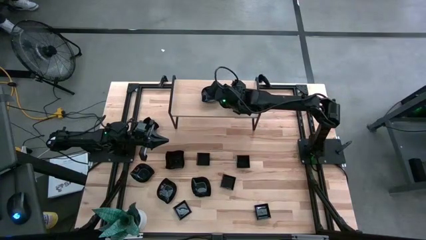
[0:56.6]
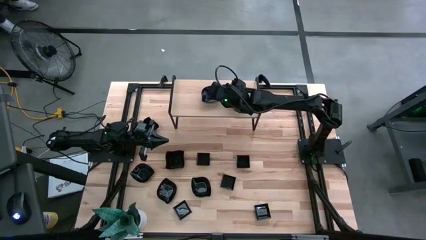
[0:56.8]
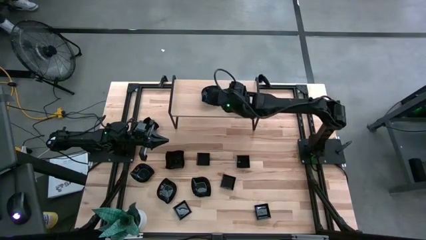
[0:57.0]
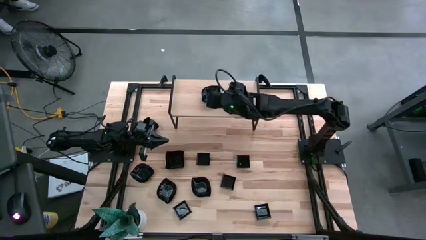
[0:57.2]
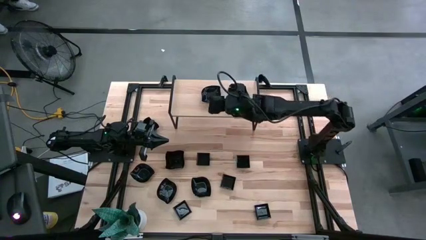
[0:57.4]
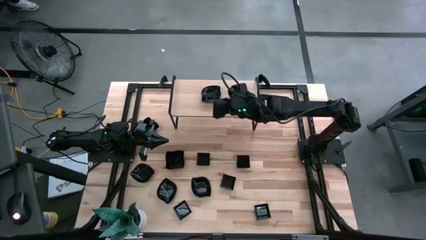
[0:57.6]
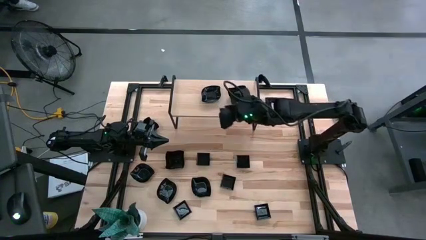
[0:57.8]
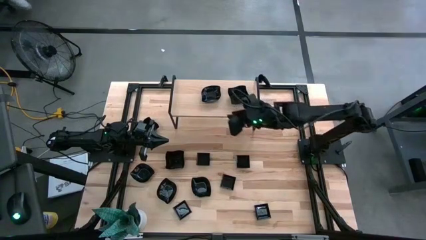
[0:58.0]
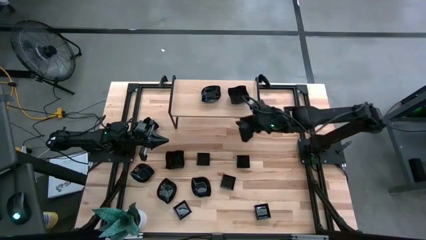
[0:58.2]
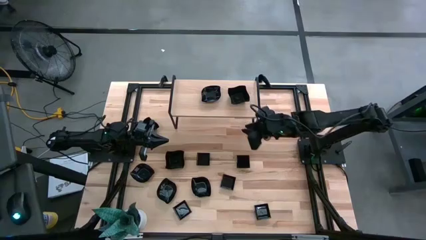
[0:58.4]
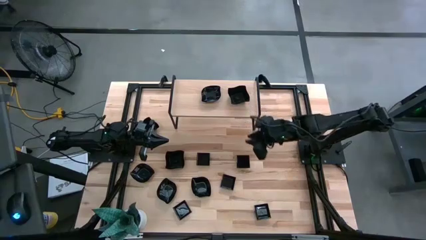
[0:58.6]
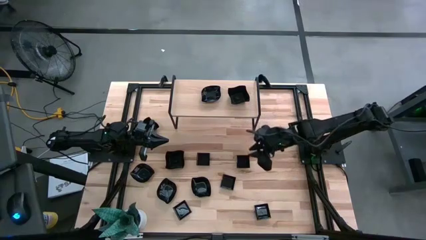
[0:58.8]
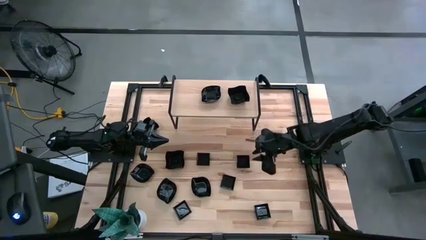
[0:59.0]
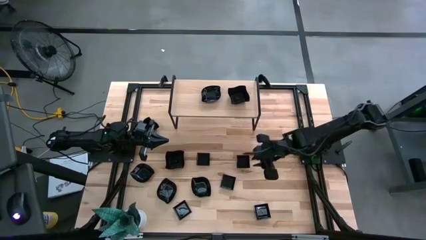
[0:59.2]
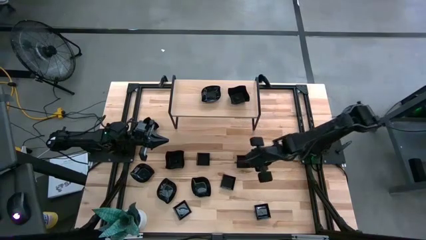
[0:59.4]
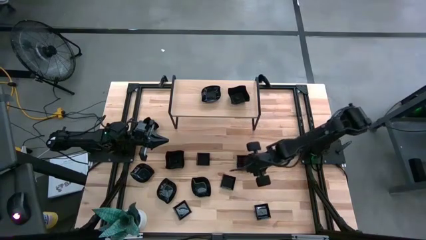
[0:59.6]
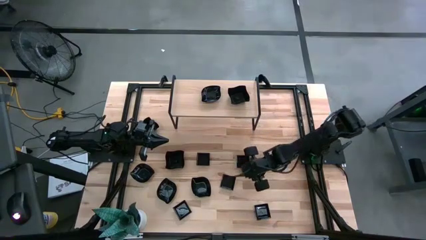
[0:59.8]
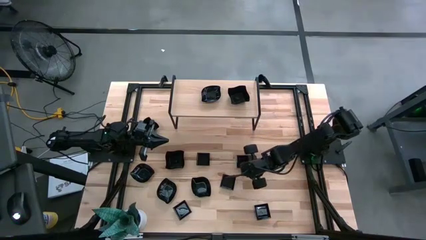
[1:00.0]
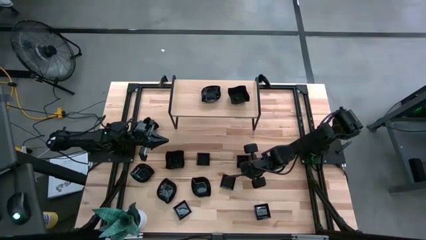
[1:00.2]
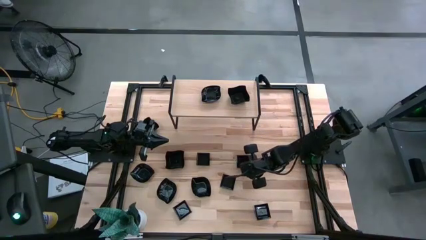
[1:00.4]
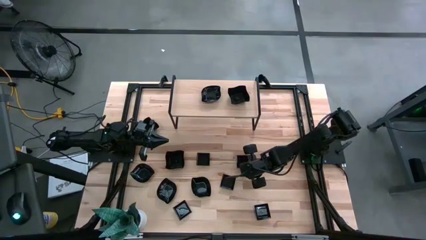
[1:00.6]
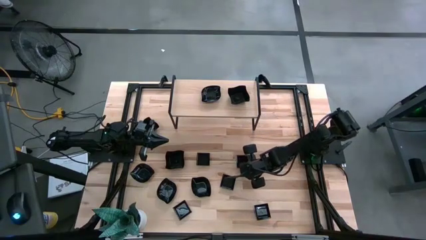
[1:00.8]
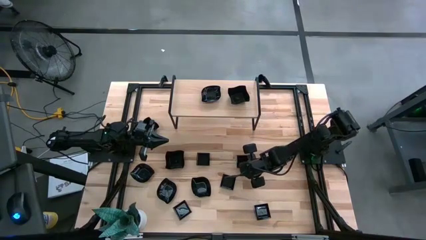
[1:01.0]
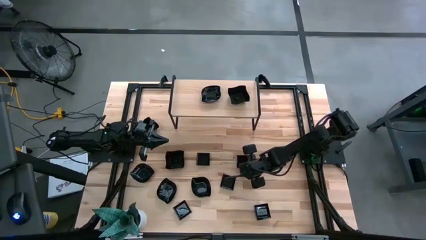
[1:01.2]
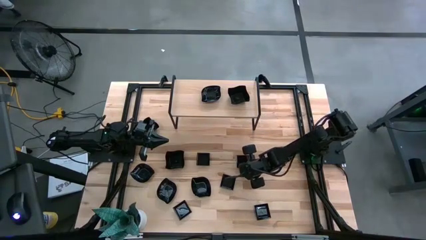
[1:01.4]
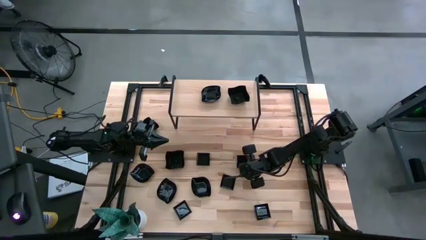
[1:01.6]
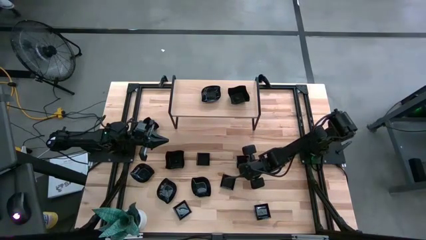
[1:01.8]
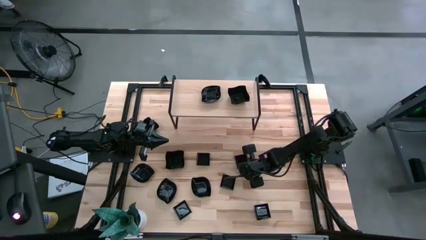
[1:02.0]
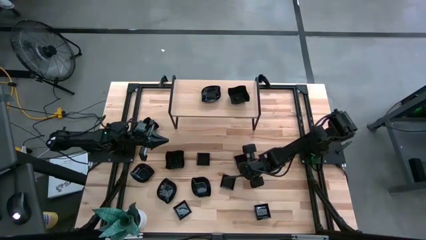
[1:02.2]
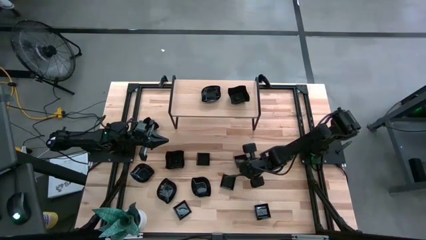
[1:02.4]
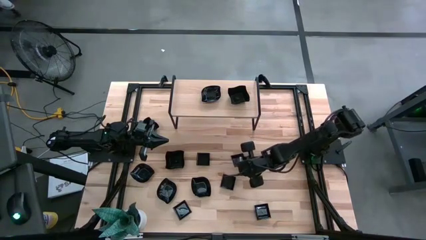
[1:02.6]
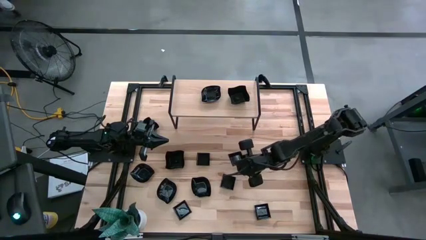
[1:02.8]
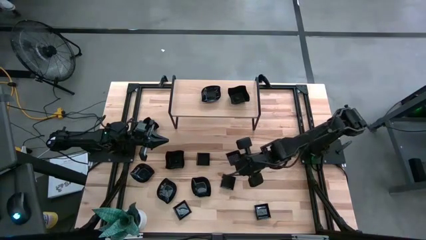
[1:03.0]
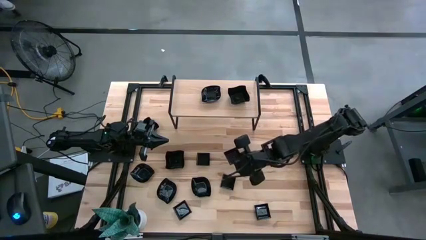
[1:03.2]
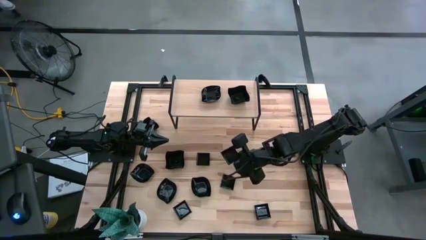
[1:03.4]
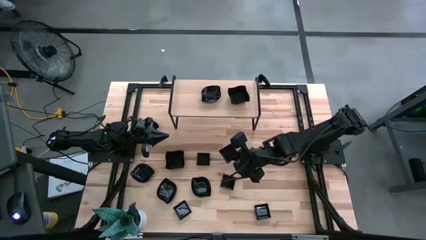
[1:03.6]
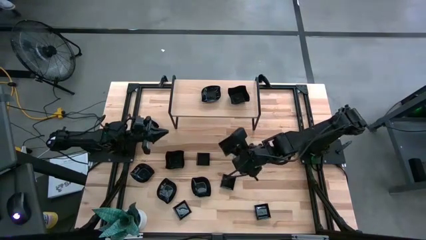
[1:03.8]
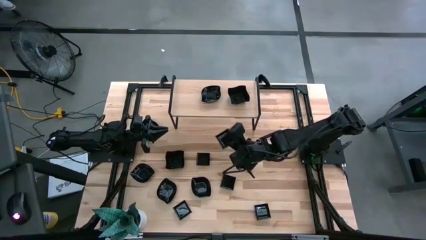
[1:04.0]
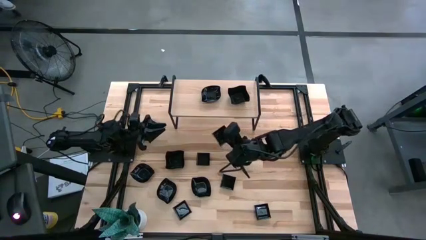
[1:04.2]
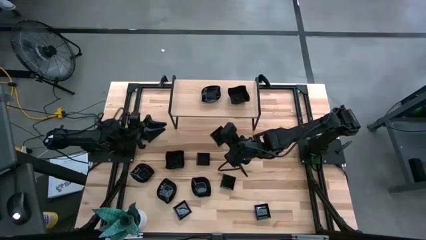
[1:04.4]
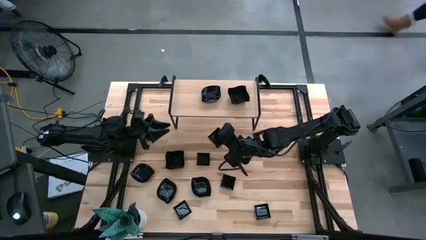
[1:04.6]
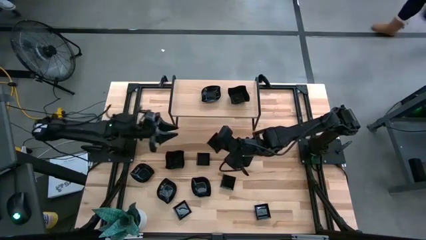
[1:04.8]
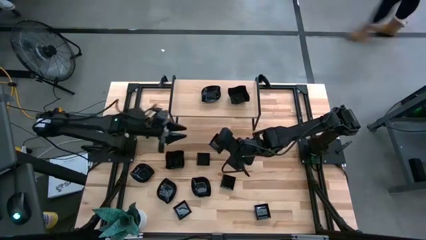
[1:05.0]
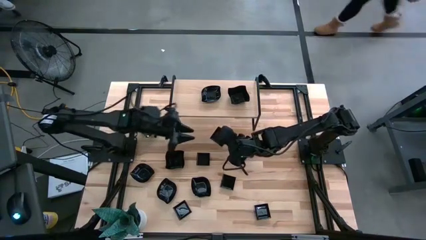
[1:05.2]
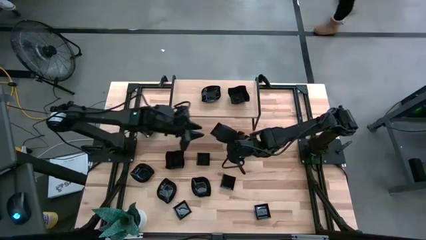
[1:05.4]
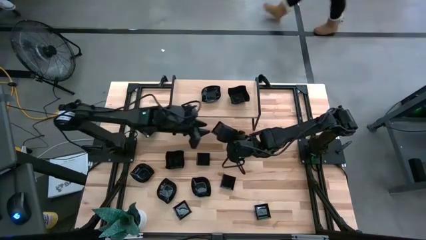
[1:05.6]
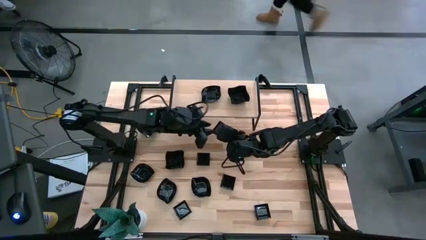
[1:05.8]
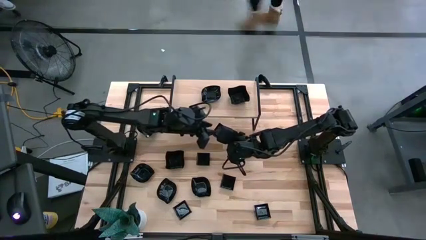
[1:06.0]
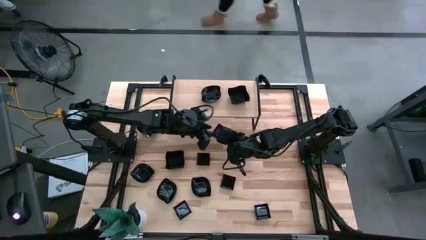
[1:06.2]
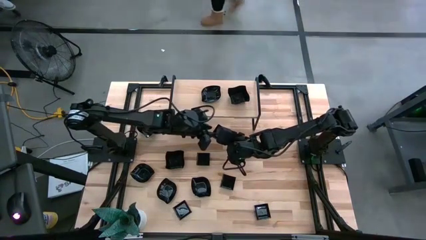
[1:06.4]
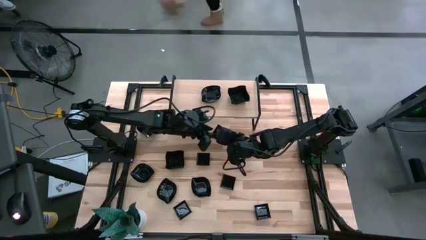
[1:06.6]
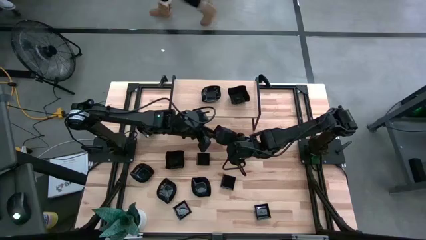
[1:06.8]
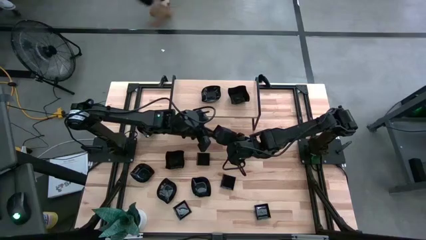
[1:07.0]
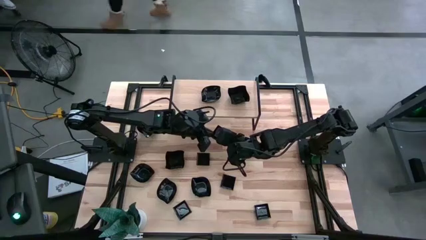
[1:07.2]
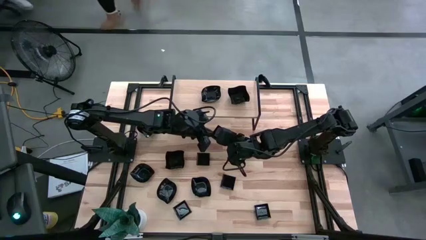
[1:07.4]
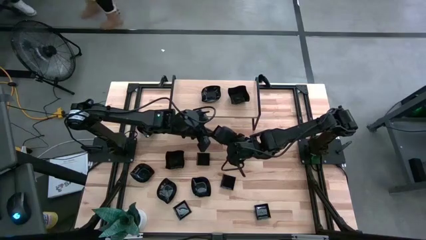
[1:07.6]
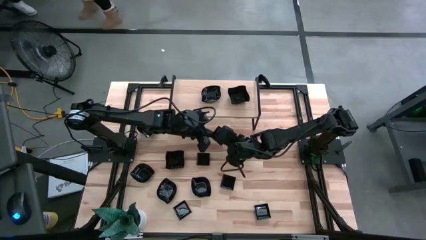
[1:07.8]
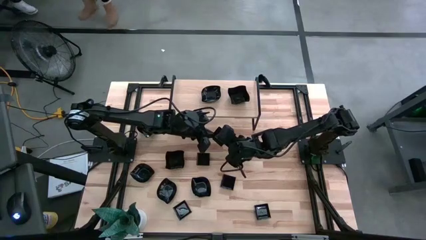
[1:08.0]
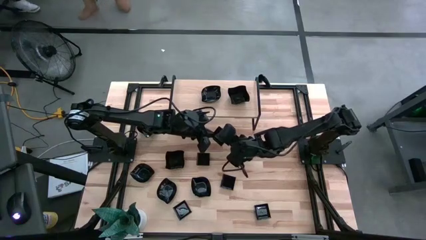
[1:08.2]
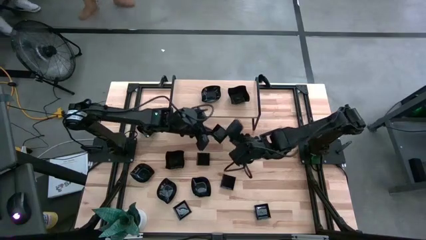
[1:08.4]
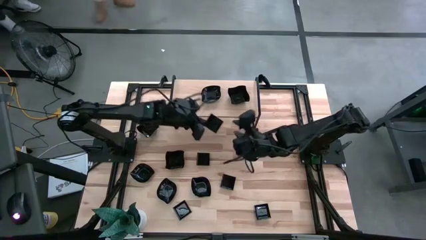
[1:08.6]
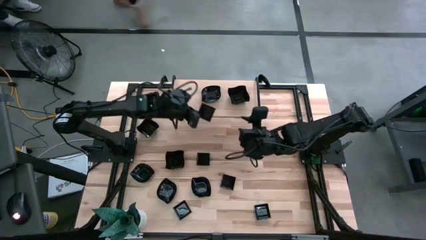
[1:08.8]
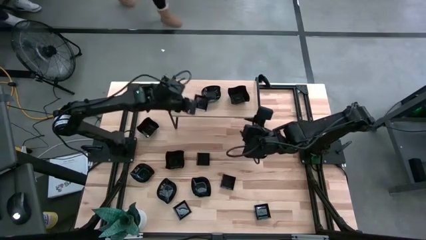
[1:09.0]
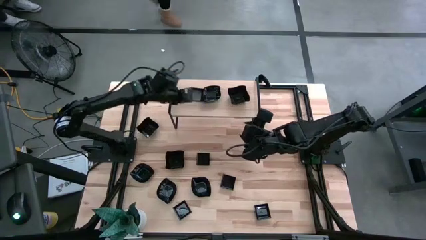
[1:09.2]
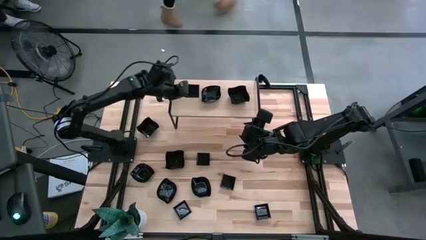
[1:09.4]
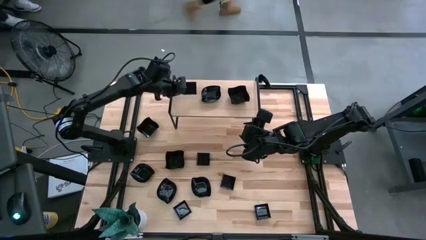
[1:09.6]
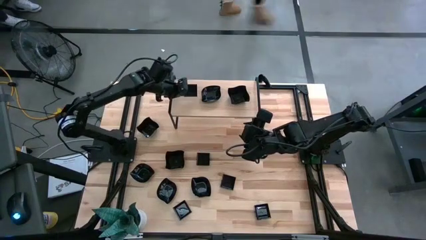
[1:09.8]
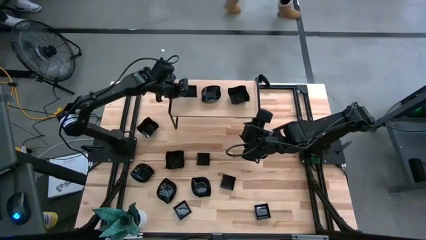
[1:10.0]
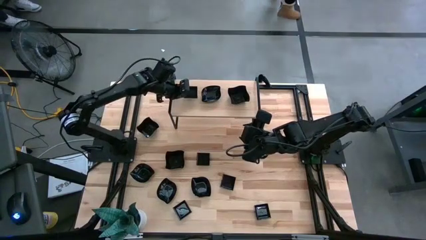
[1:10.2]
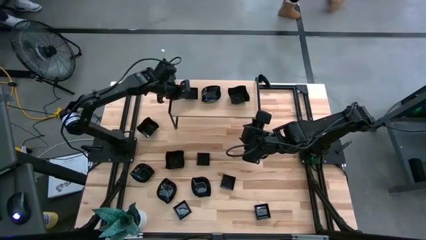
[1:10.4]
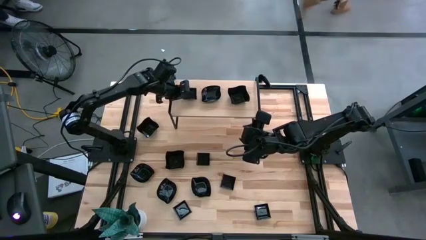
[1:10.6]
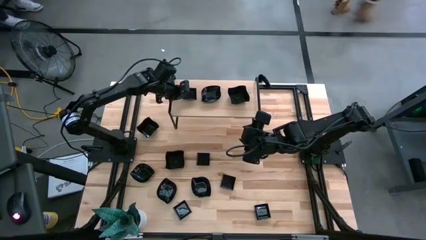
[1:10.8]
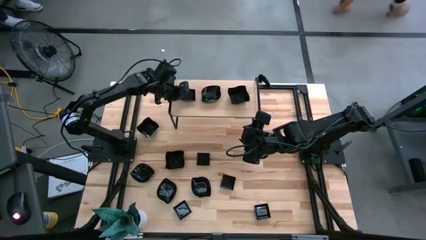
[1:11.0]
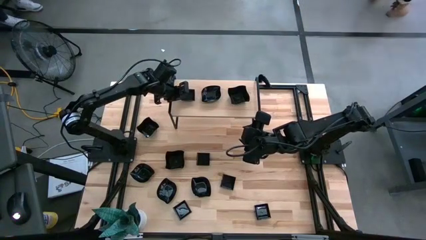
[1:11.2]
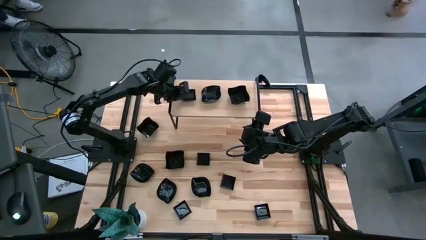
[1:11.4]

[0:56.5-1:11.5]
Task: Pick & Place Mini shaped plates
Put the square-shaped plate on the shelf
